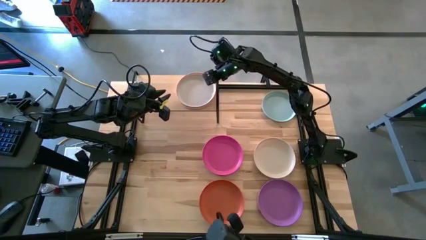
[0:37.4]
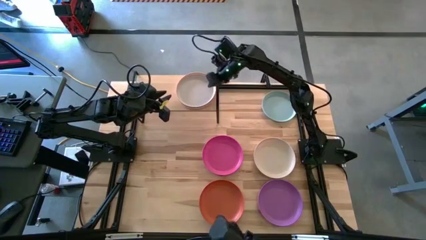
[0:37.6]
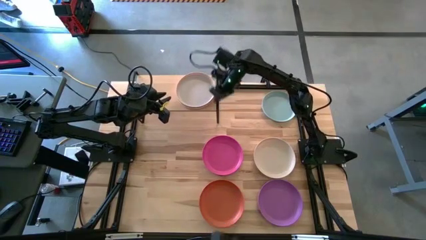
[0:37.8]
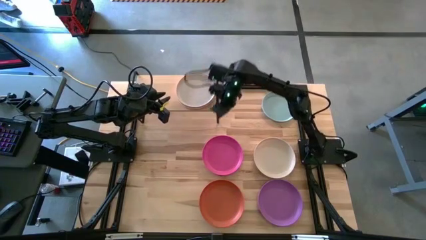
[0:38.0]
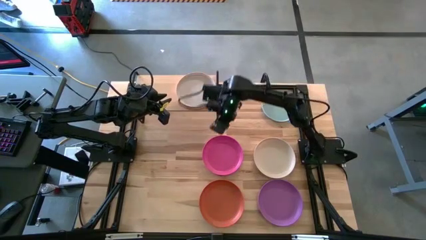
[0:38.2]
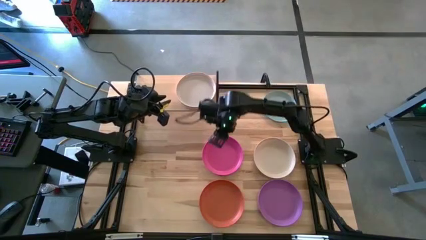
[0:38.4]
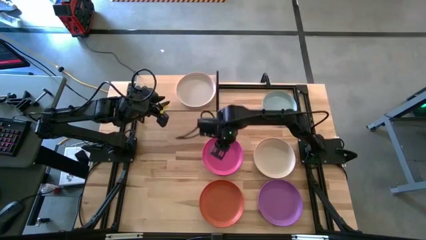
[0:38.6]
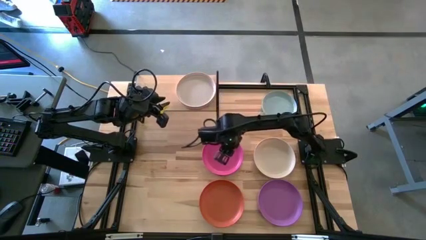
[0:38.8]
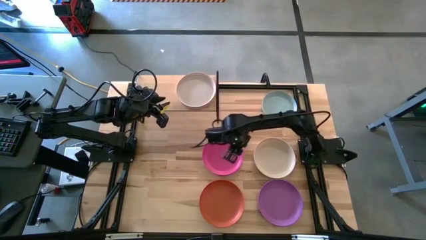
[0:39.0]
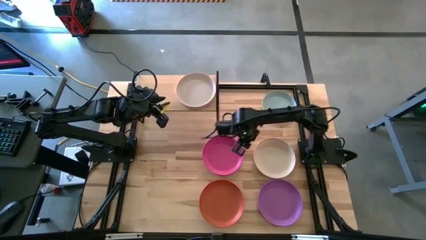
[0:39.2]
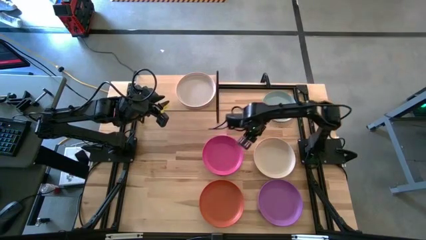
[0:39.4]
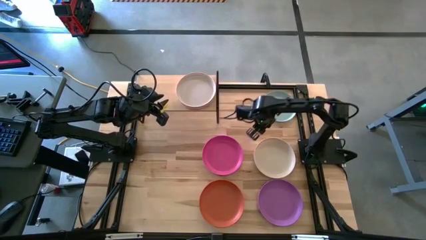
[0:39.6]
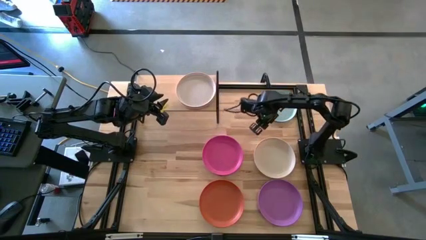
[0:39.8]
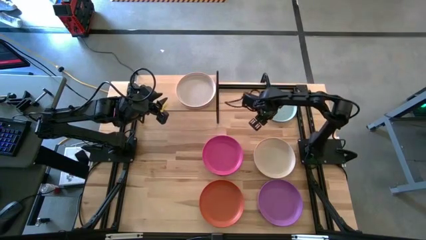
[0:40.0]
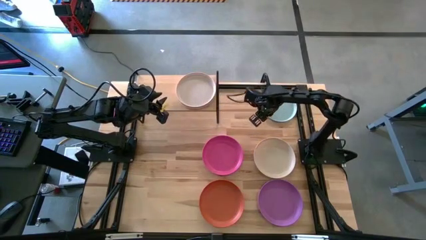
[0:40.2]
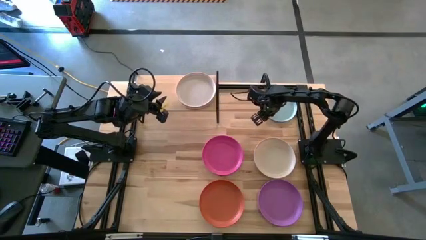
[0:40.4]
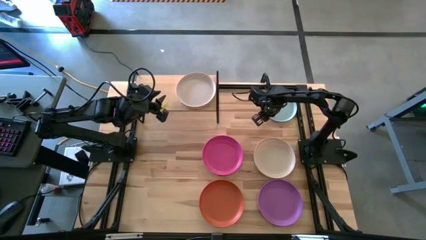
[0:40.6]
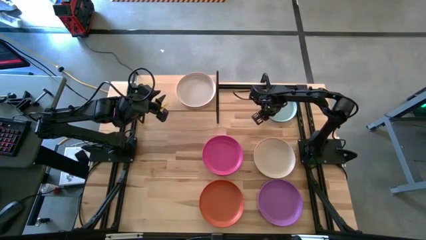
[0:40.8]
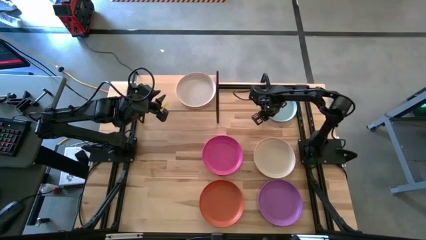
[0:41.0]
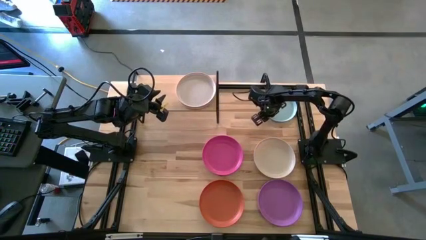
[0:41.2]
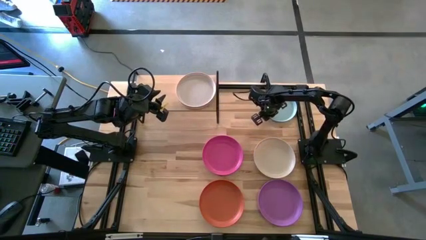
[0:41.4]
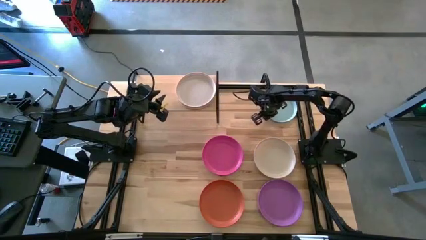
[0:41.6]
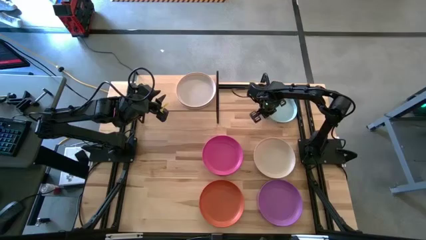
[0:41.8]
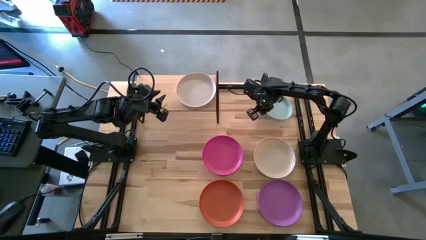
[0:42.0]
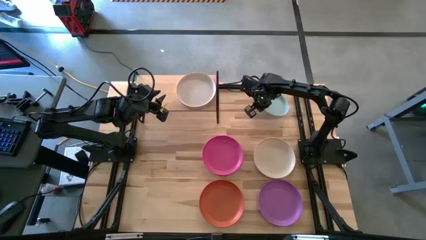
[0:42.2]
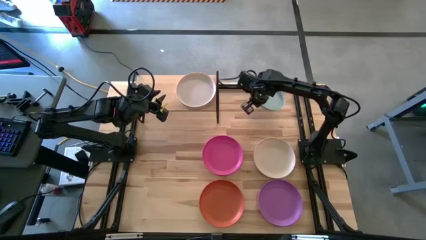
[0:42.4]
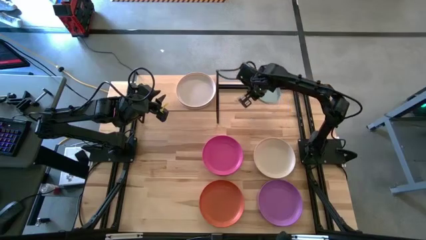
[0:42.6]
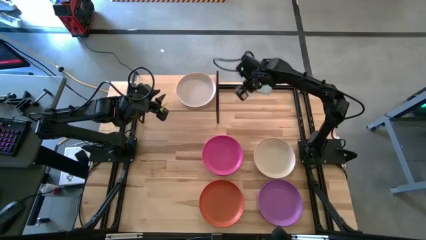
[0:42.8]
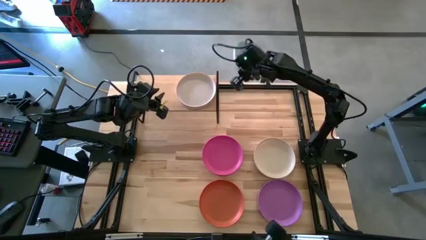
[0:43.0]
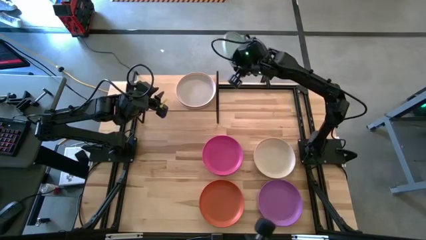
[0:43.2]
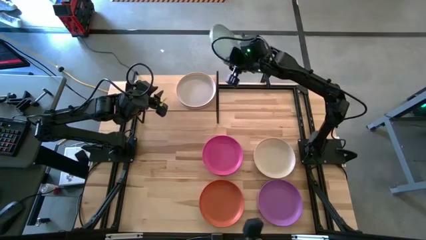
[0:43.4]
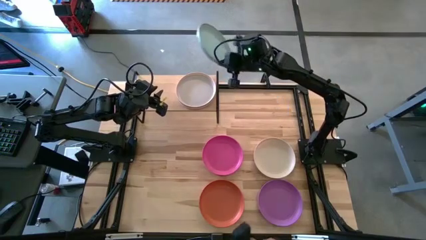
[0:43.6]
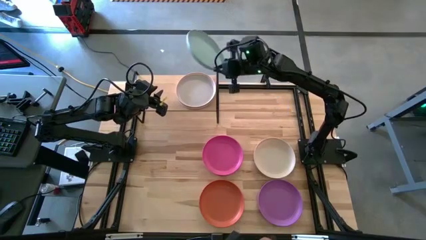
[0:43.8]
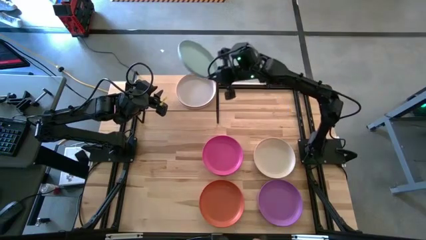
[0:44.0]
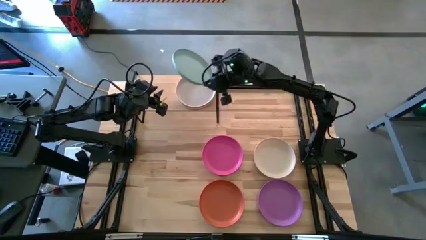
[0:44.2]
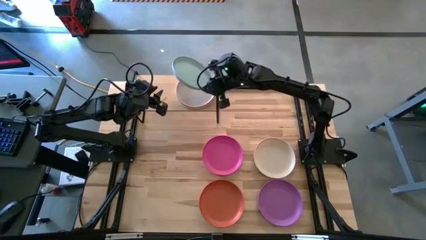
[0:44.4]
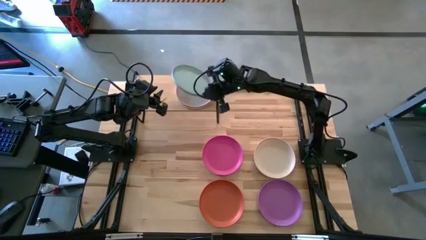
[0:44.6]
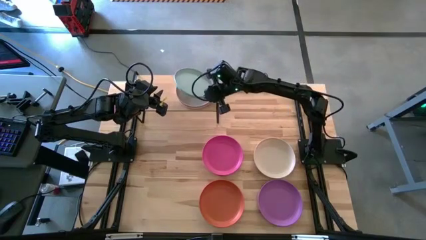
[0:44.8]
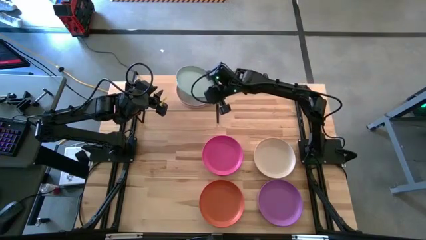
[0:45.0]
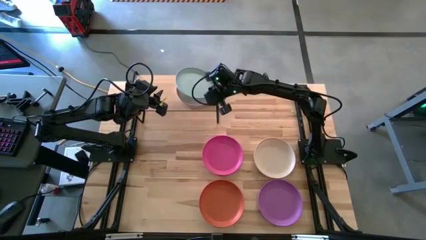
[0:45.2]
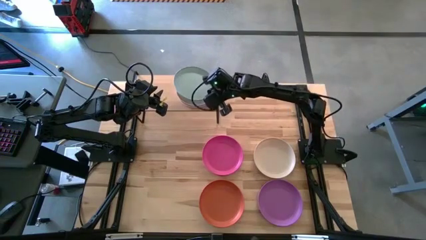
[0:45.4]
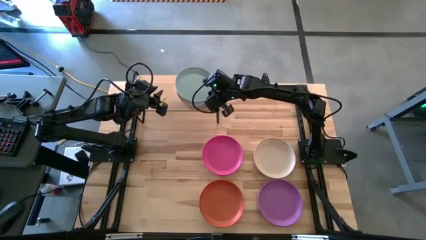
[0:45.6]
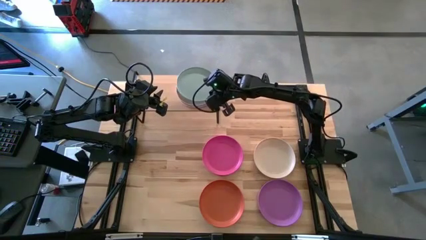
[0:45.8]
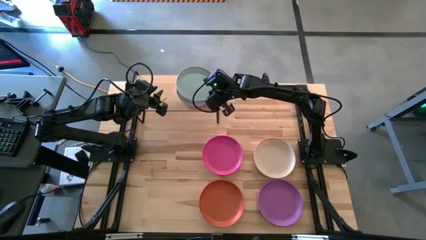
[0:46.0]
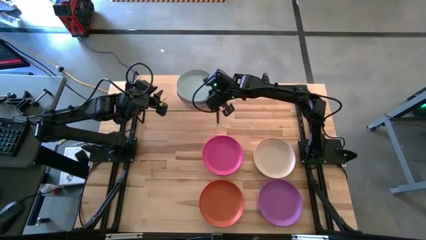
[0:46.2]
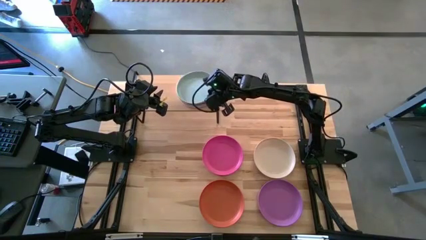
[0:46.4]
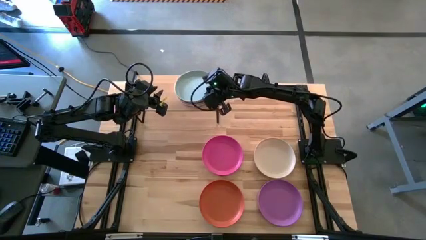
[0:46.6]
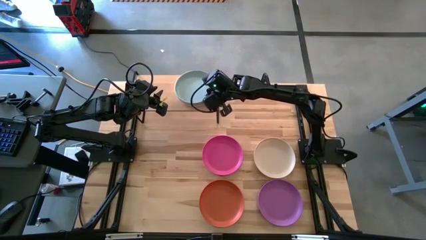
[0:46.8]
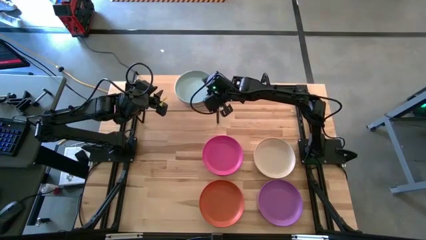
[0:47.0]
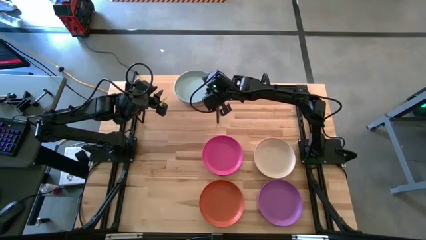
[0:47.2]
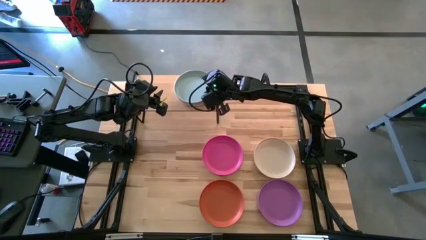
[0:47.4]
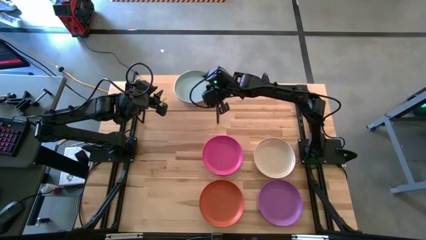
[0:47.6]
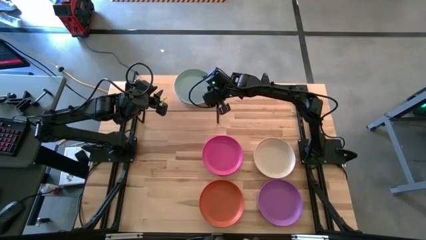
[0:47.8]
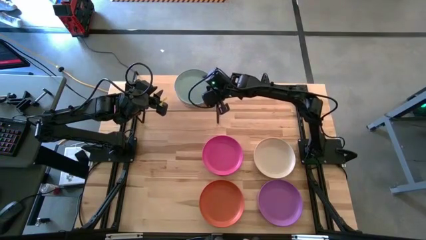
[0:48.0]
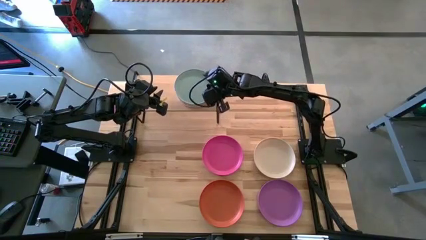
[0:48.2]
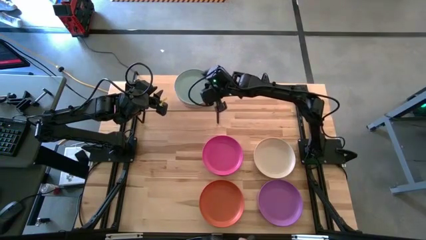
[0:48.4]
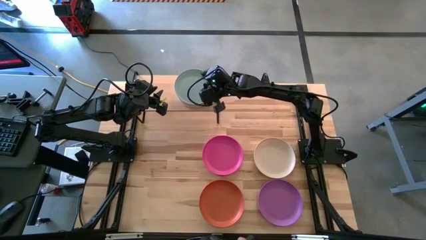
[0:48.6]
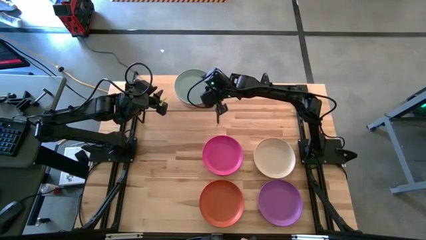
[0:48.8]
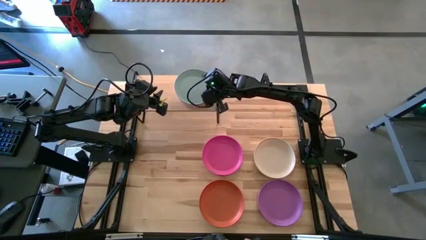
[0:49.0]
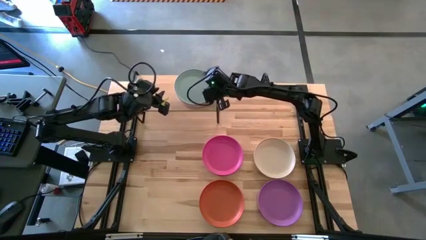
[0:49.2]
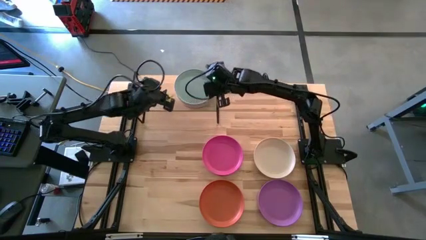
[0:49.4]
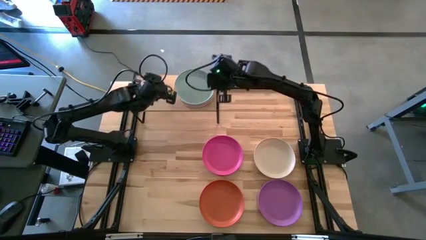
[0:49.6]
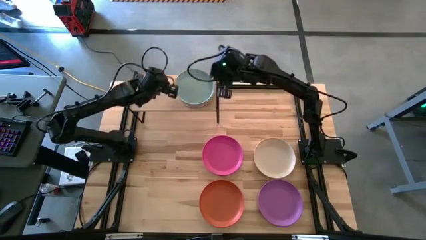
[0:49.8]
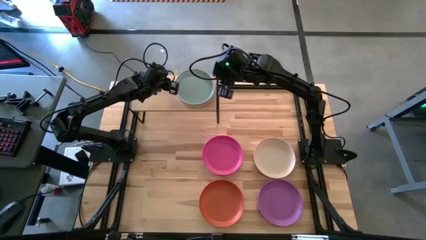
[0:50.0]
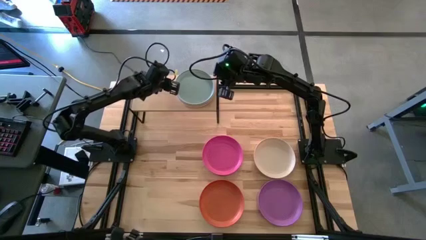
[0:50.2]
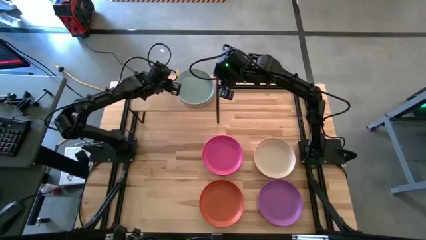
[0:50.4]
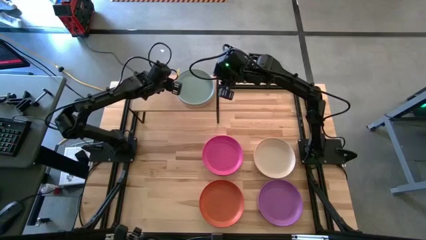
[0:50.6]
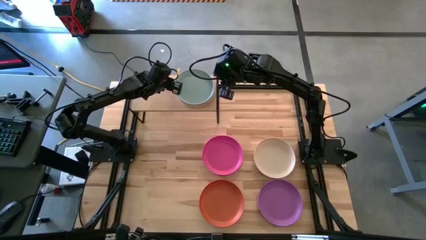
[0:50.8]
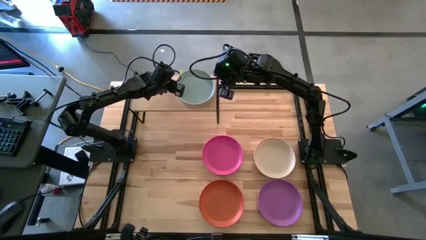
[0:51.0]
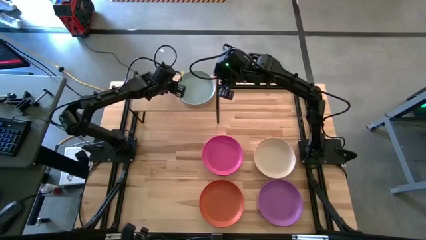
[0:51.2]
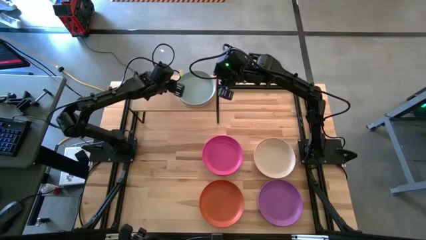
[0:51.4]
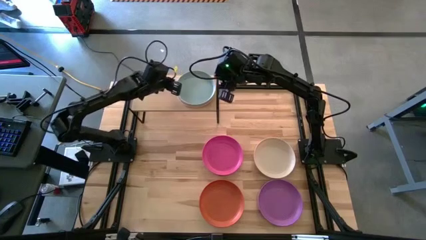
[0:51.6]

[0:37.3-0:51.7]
Task: Place and stack plates onto a shelf
Stack the light blue plate on top of the gray plate

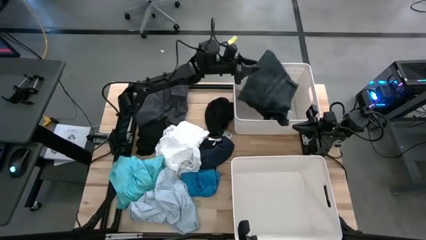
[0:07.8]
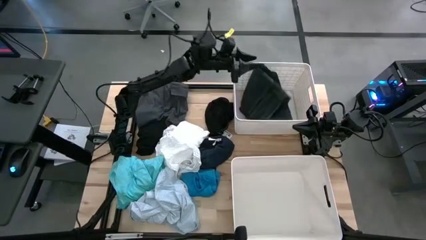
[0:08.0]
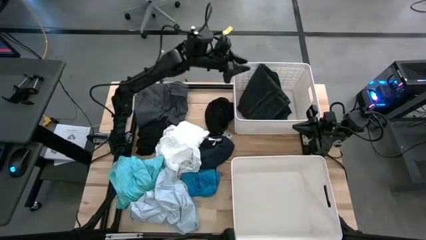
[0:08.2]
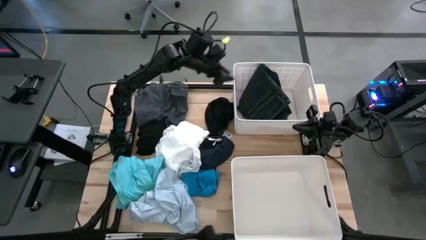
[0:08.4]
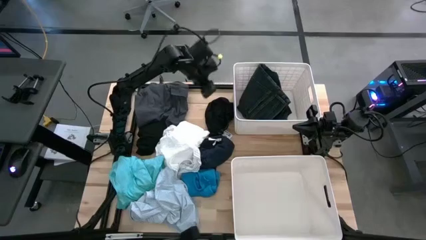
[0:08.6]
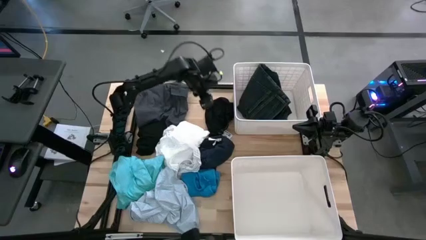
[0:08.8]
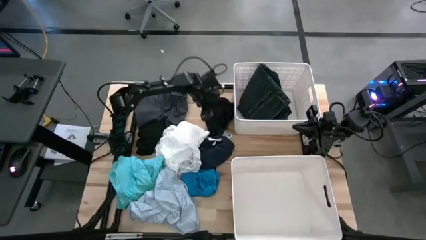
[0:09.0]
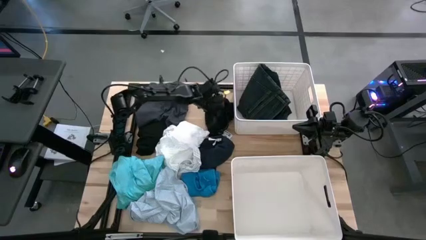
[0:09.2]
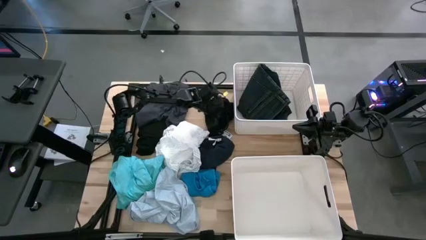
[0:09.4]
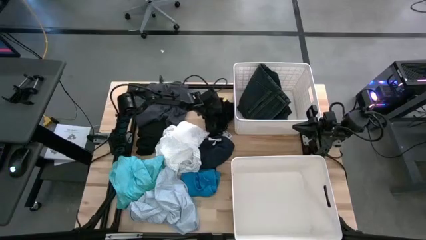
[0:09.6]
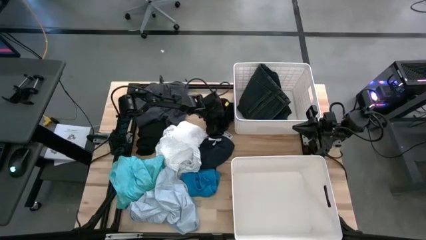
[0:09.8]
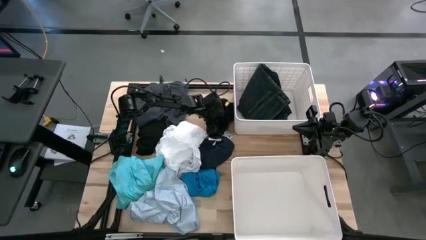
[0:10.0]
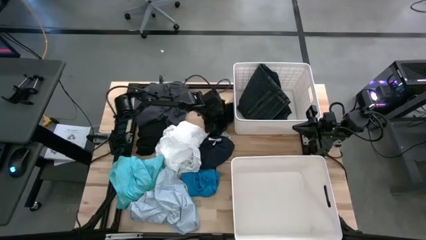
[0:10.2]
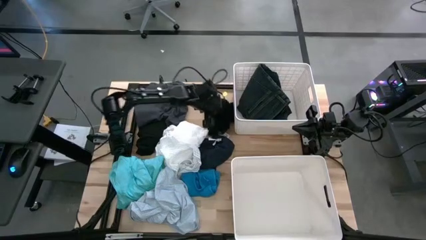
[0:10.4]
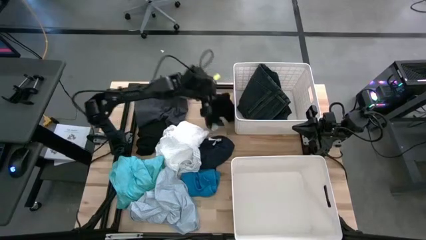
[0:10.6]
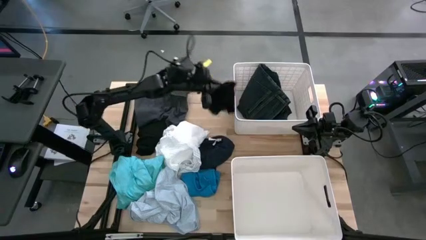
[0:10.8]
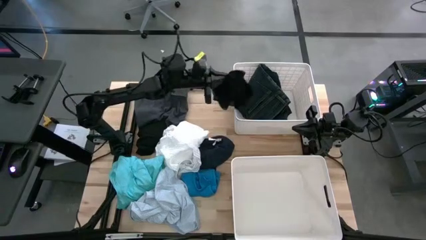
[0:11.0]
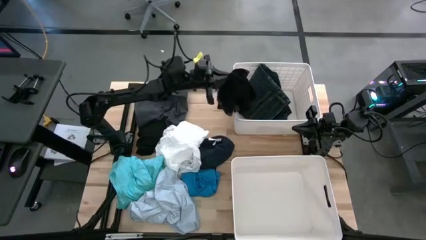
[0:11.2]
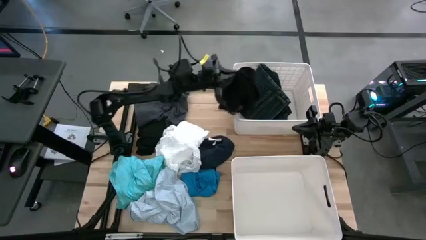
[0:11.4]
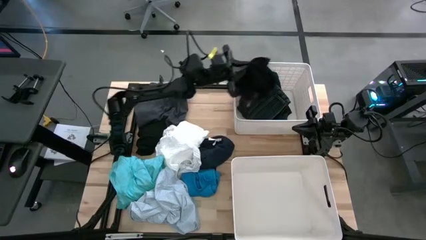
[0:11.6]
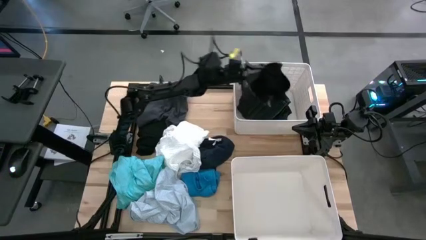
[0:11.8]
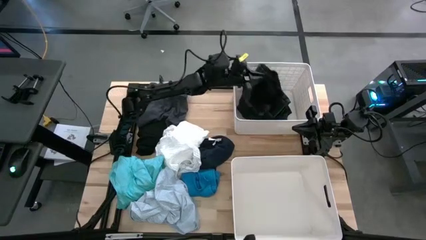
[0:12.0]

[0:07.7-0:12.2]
Task: Sort clothes
Put the black boxer into the top white laundry bin
